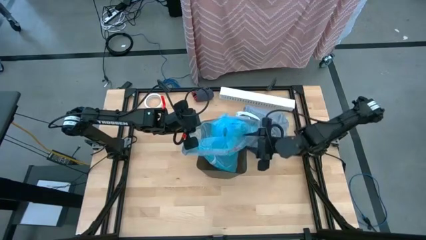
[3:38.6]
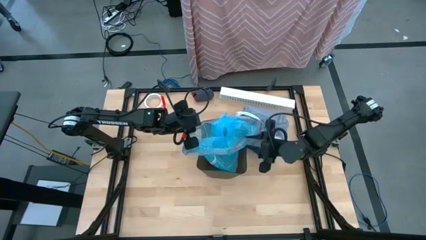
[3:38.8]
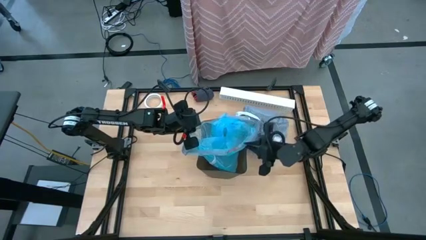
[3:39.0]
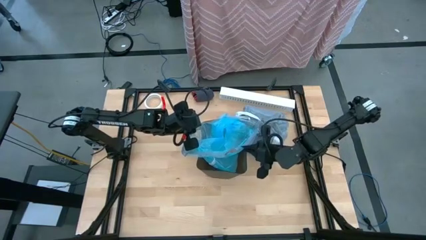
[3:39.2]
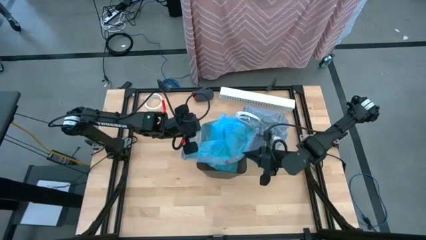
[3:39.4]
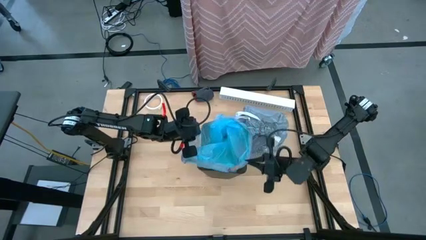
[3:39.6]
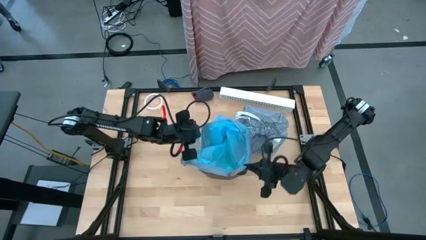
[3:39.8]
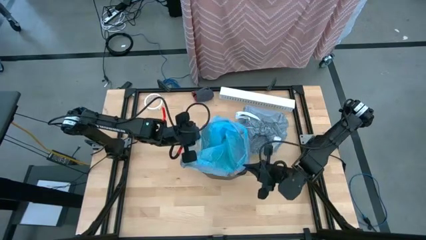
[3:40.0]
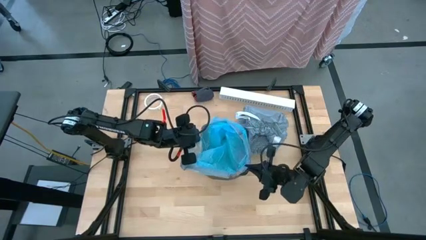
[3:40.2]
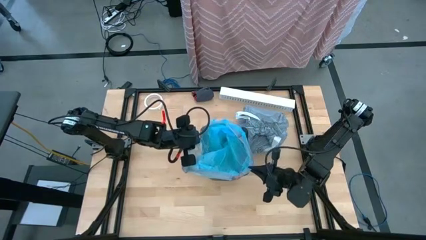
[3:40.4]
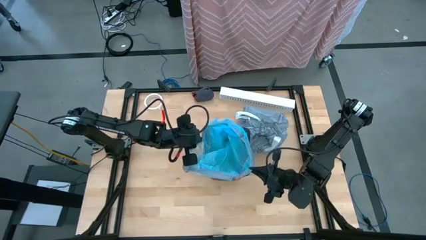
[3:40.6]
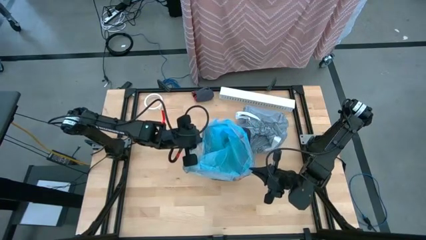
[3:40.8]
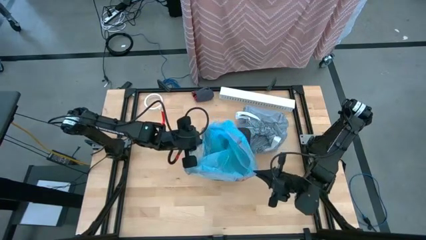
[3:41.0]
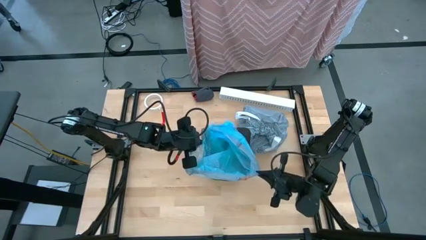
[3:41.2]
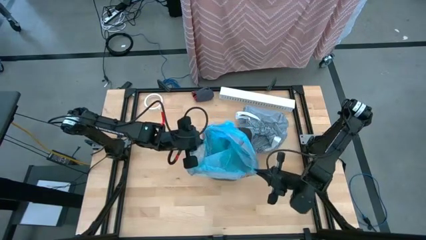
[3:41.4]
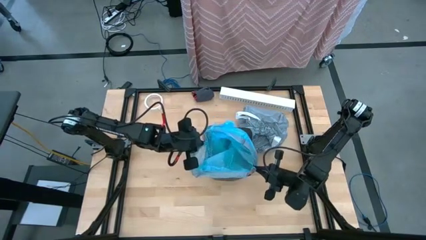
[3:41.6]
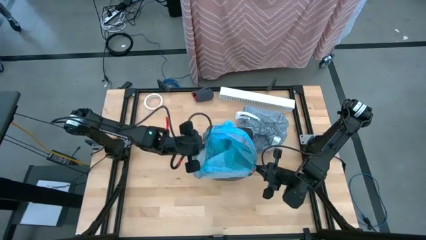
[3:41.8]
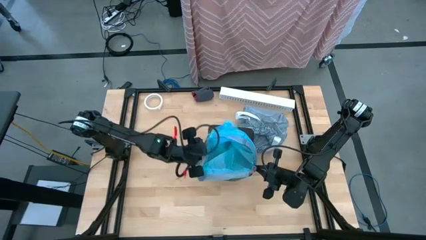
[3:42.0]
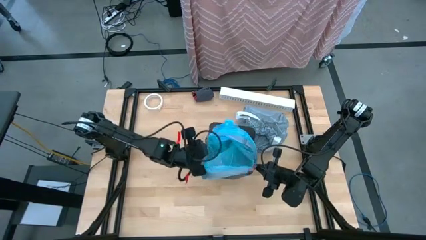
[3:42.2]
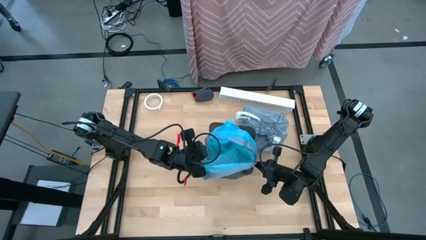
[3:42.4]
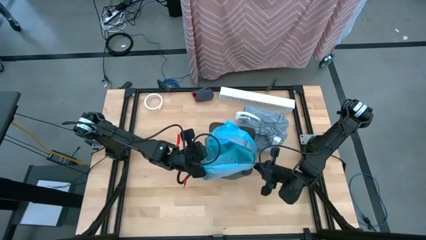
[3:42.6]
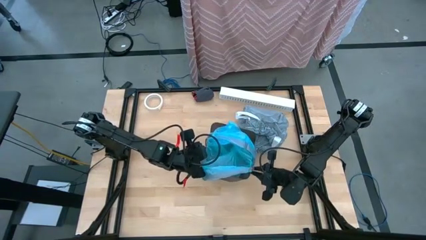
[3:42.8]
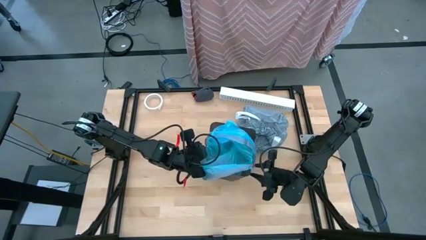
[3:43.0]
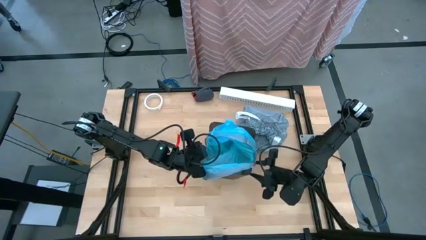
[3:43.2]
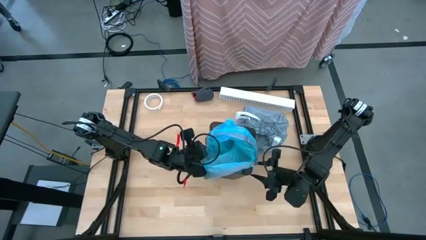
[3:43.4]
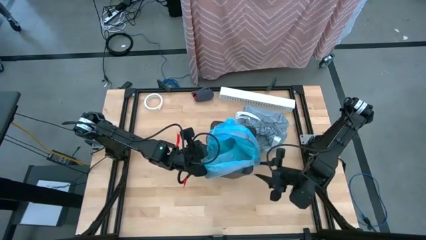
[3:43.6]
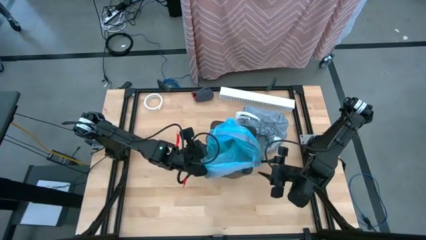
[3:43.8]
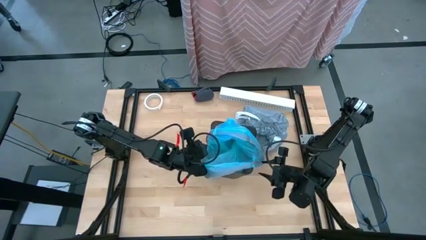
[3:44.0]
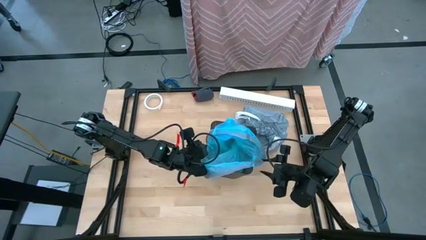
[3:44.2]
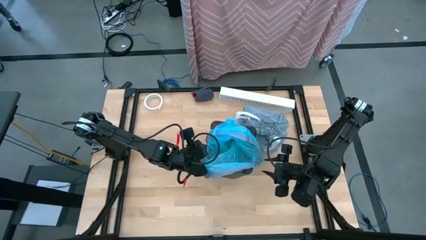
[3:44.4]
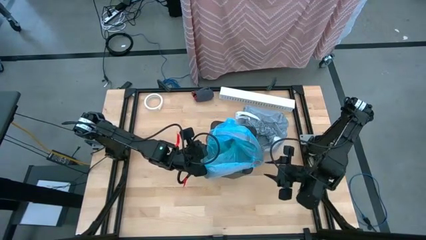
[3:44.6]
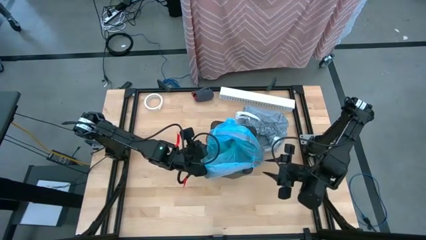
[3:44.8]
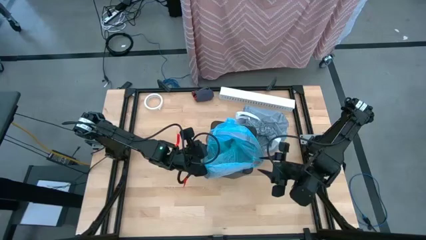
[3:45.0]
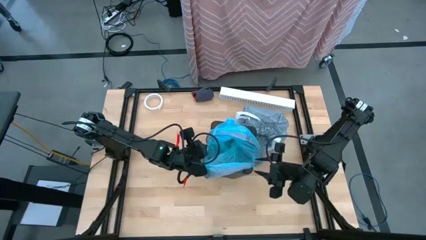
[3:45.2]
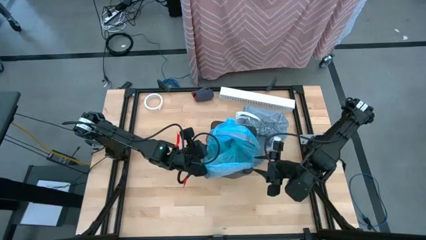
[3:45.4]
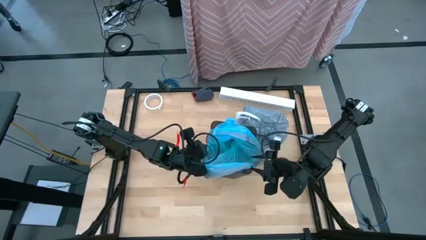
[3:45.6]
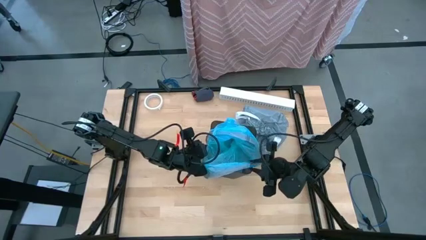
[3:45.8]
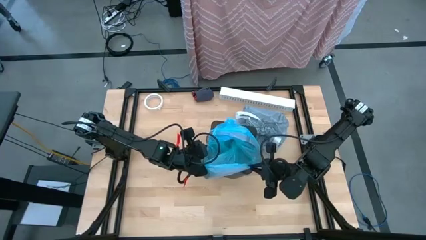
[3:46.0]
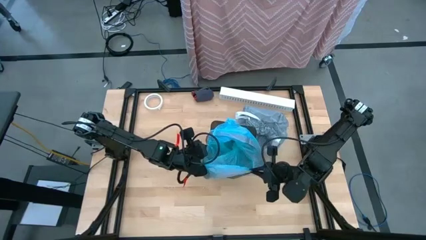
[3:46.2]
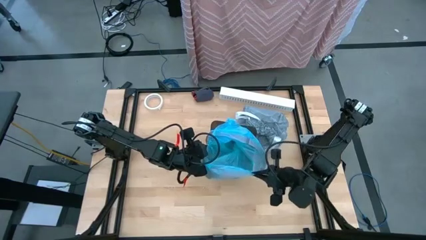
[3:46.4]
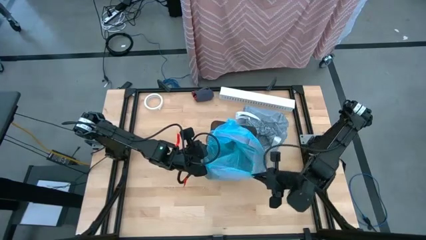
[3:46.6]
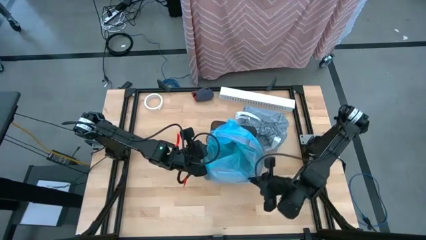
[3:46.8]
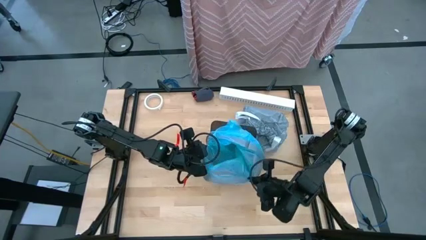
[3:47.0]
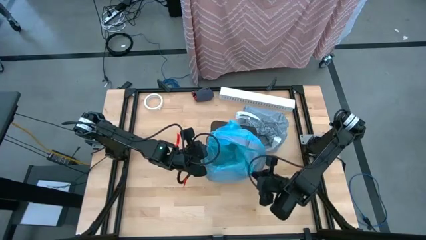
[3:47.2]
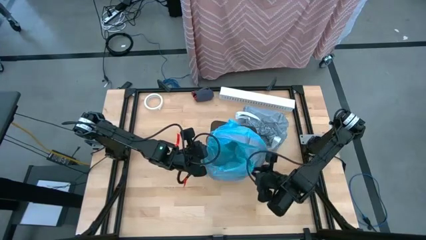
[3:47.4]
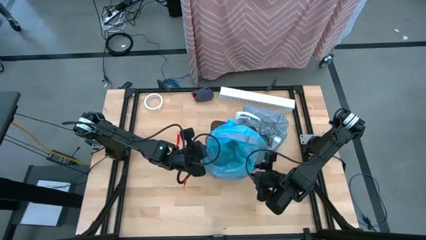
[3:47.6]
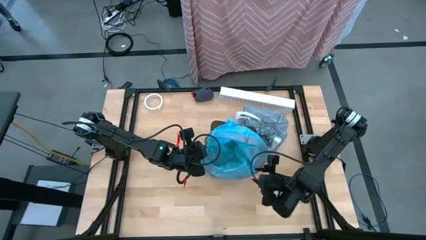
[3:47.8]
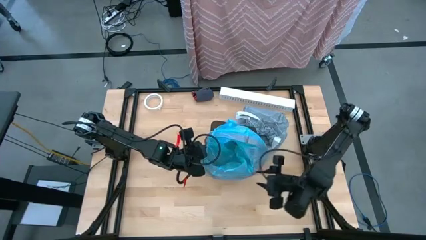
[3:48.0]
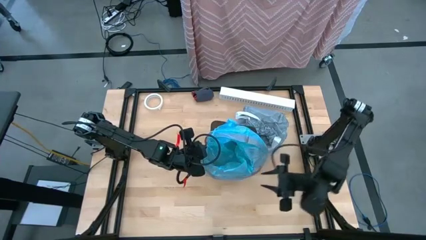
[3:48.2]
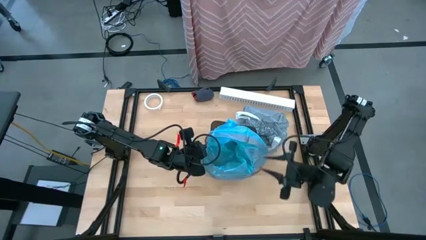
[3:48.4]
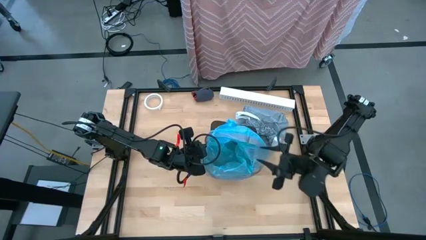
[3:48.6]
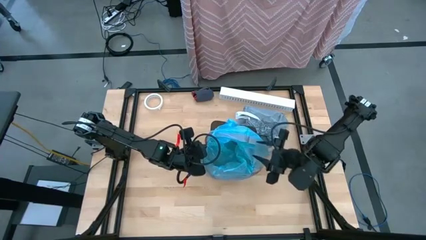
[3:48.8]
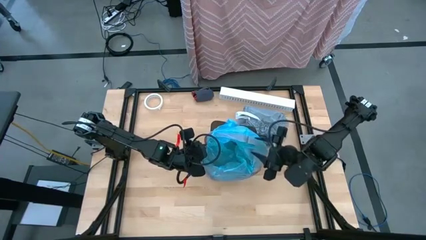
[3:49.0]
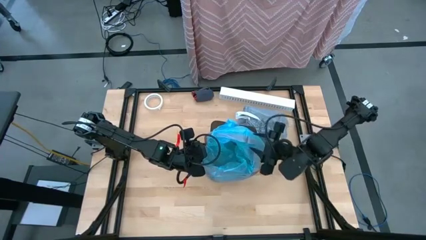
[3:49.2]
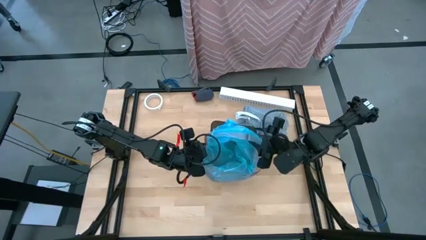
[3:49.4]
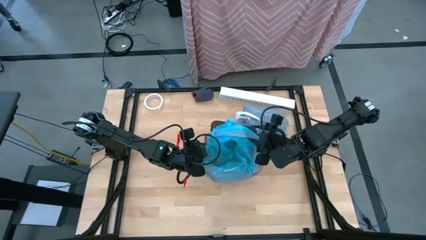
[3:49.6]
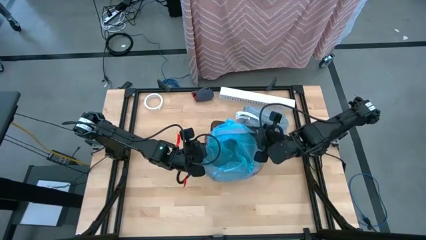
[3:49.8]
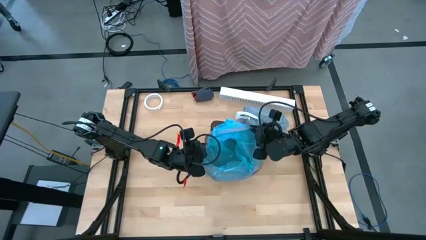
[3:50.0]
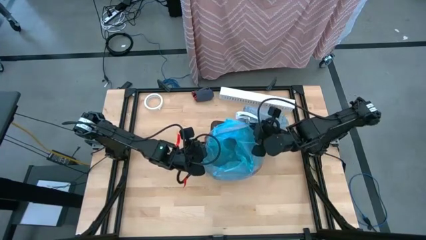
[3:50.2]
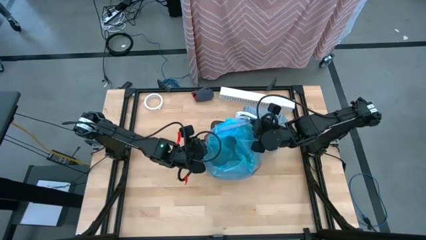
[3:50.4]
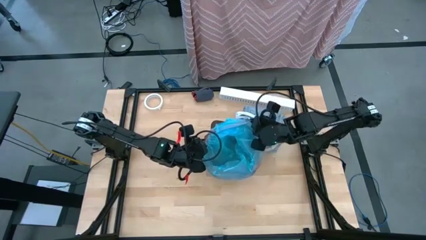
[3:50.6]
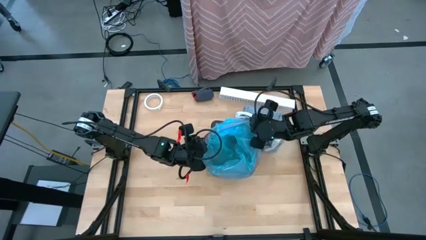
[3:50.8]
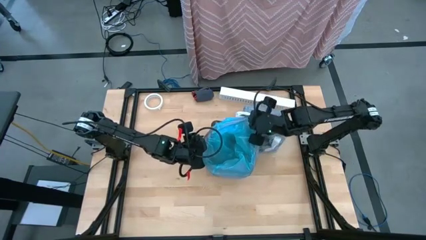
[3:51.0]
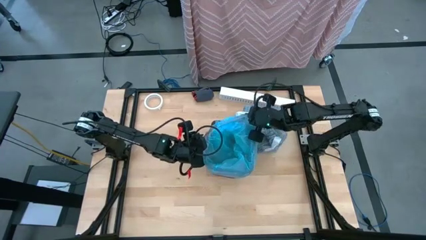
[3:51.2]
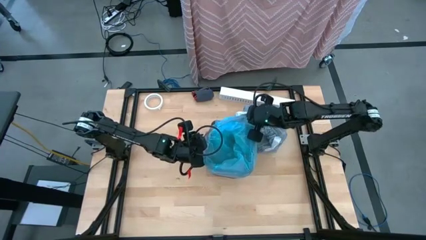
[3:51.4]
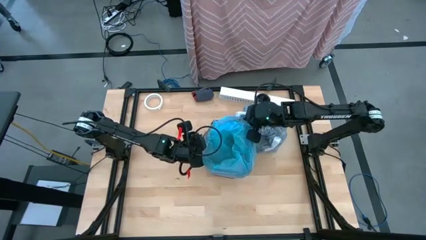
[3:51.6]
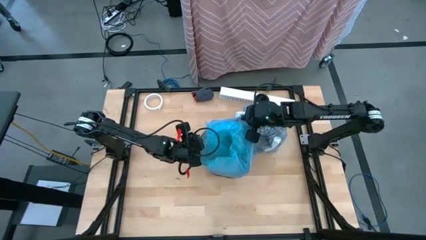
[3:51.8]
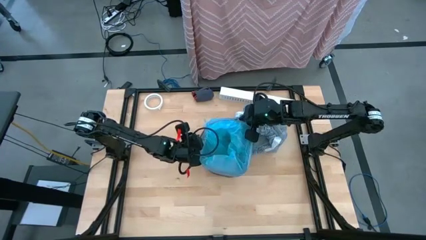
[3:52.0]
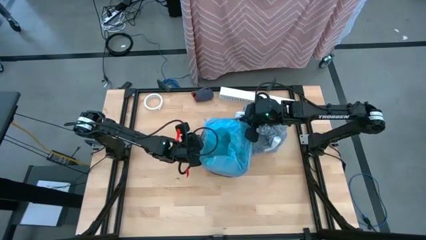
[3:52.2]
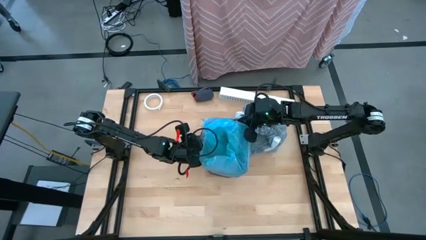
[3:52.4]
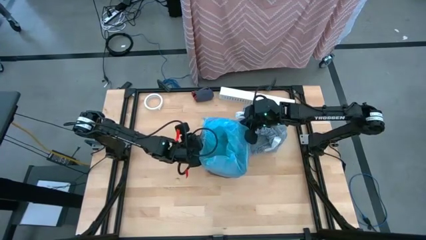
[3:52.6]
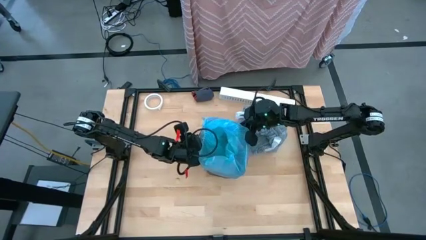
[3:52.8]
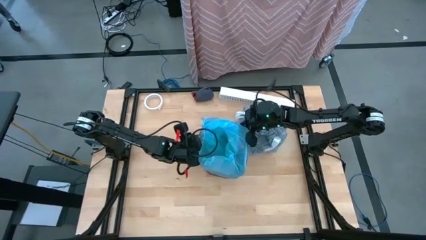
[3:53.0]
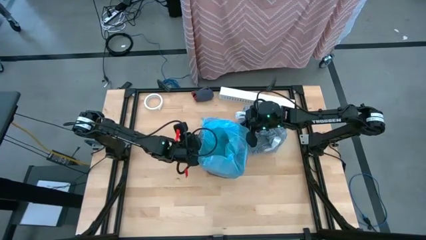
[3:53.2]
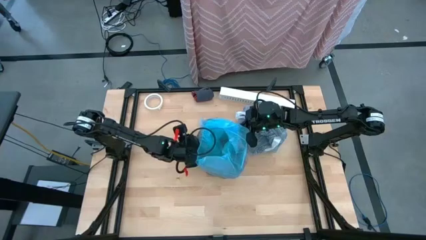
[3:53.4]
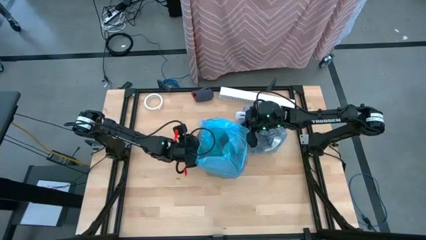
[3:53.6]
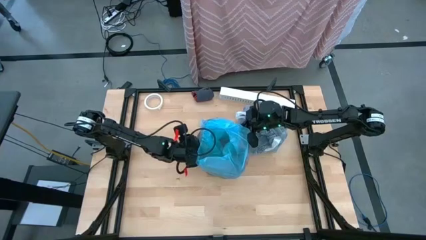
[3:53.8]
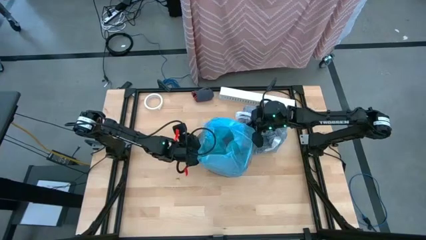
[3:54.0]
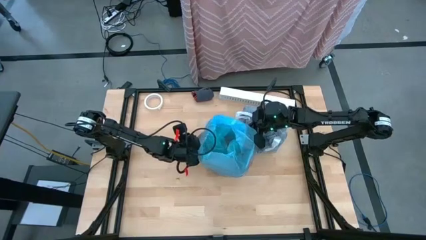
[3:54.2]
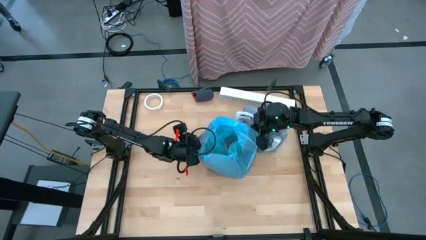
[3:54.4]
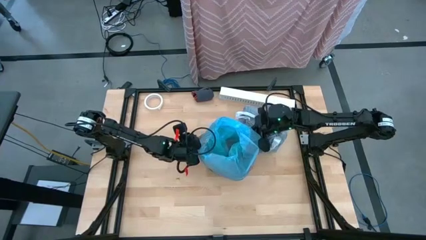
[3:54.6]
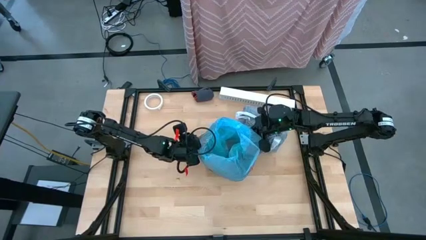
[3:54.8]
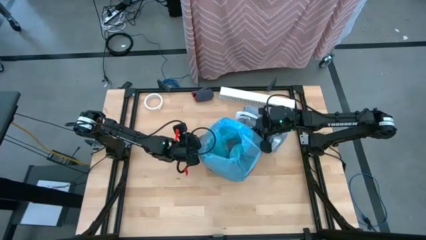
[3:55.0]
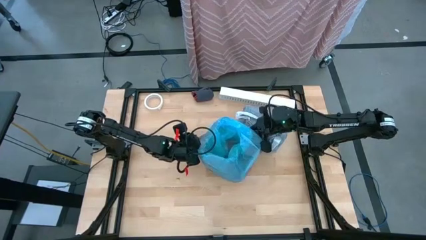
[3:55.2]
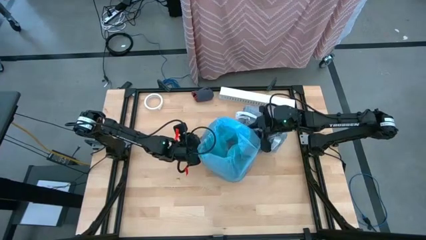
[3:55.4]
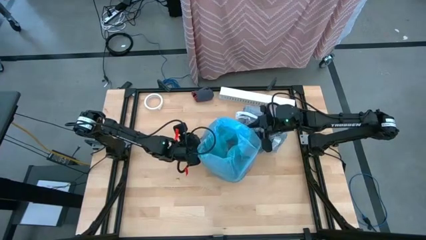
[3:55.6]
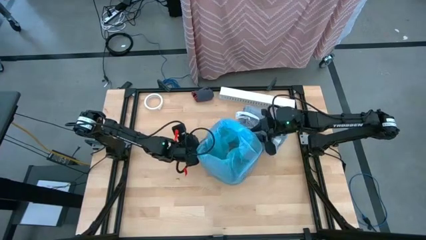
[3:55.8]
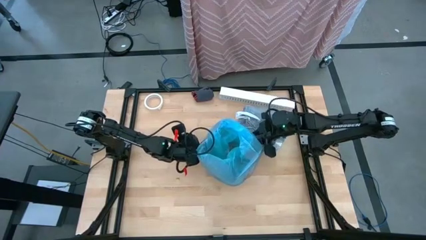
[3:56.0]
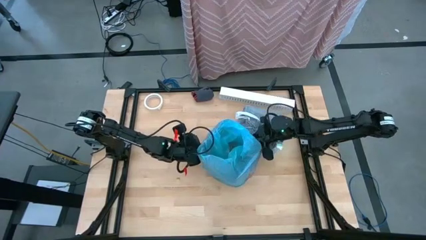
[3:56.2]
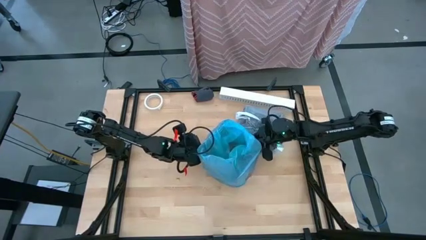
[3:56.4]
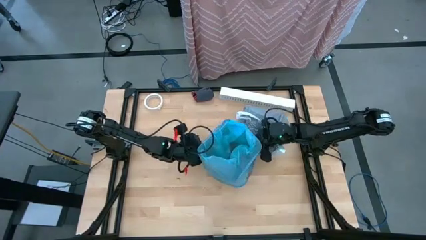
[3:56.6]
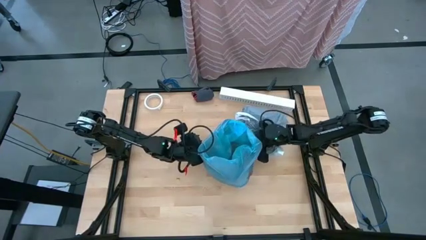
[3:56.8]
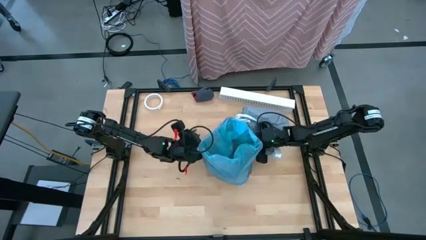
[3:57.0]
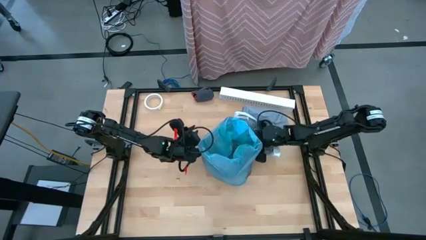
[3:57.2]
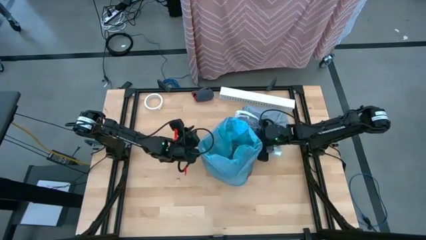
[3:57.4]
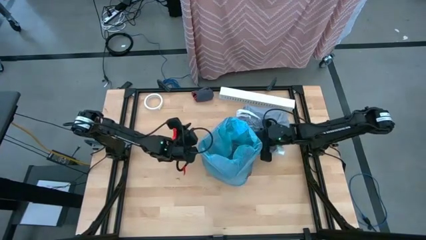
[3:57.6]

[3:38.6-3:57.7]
Task: place trash/remove bag and relplace
Insert the new blue trash bag into the black trash bin
